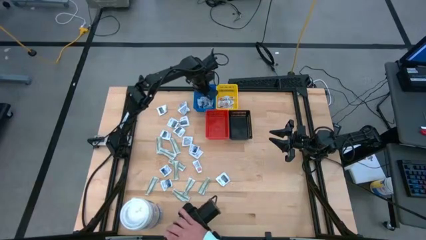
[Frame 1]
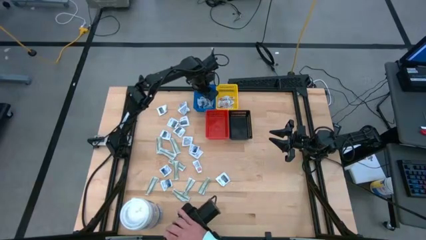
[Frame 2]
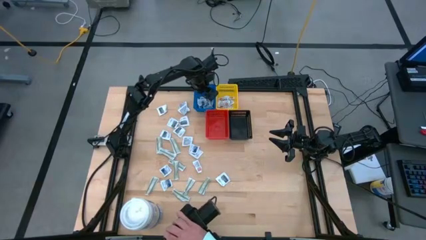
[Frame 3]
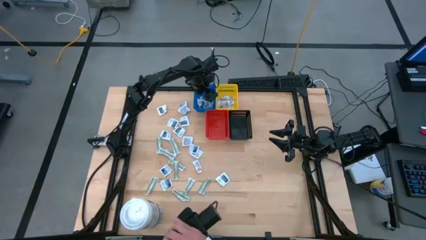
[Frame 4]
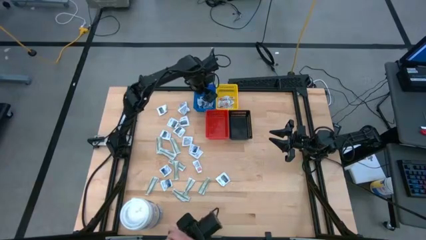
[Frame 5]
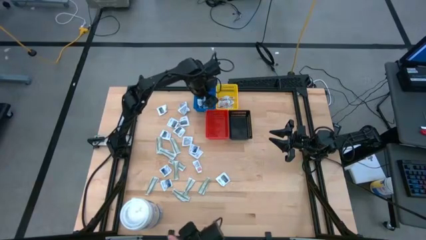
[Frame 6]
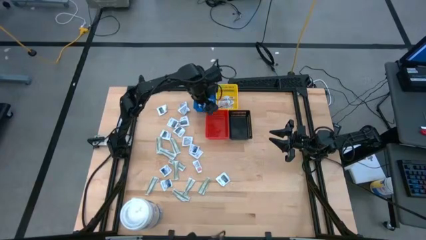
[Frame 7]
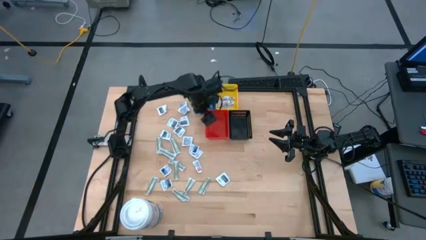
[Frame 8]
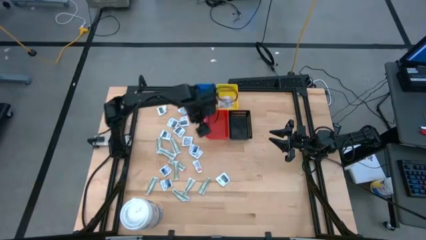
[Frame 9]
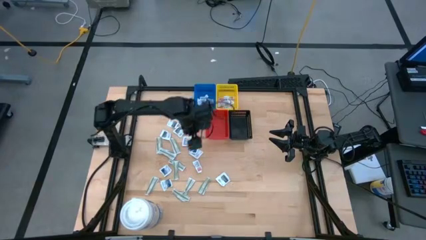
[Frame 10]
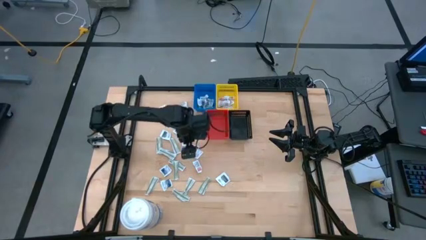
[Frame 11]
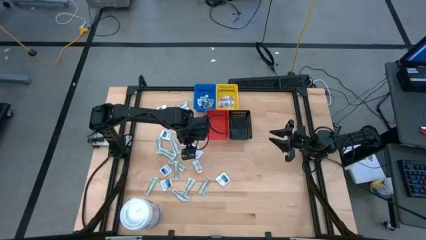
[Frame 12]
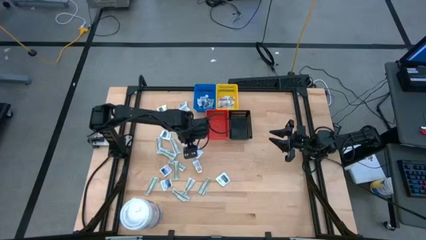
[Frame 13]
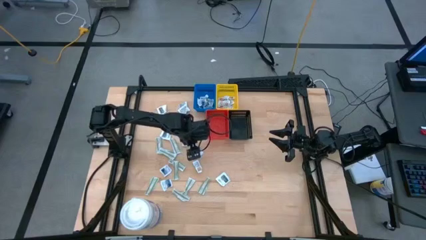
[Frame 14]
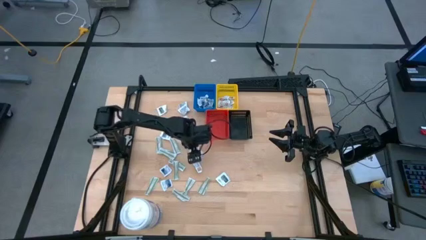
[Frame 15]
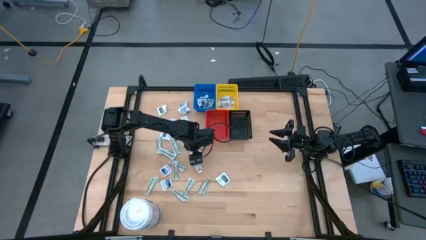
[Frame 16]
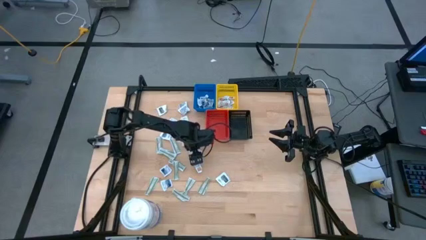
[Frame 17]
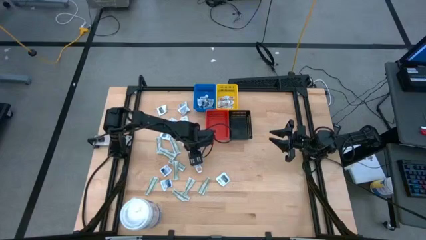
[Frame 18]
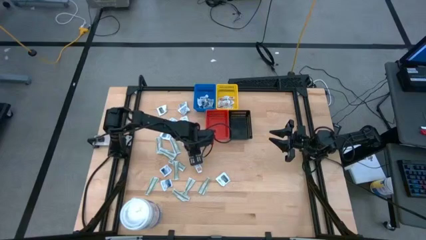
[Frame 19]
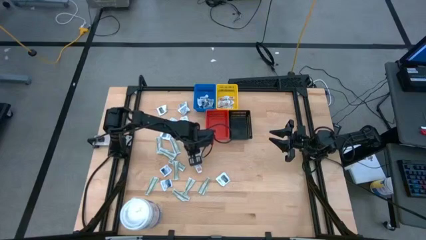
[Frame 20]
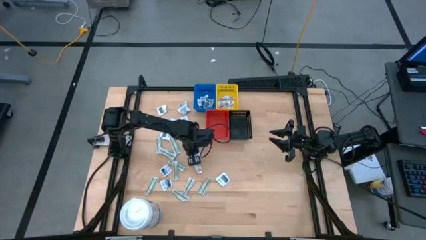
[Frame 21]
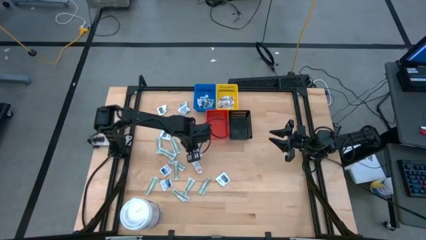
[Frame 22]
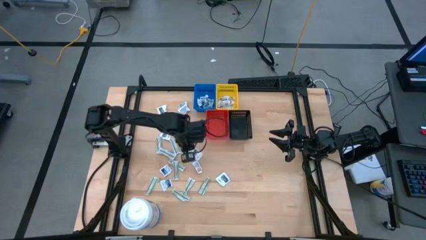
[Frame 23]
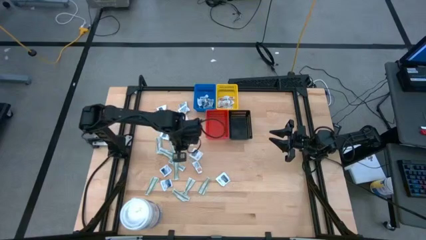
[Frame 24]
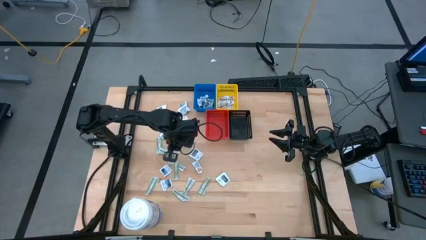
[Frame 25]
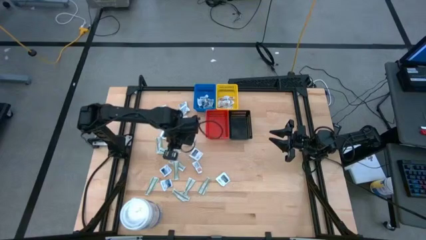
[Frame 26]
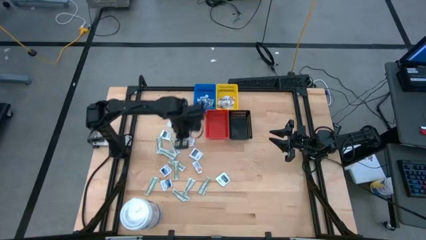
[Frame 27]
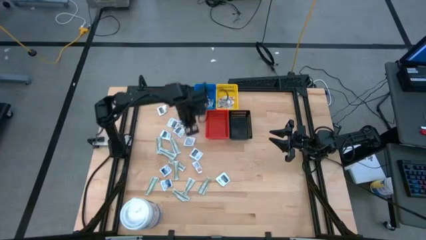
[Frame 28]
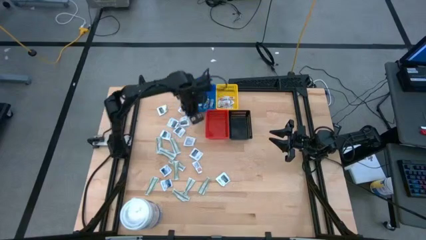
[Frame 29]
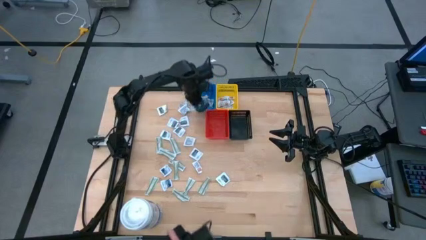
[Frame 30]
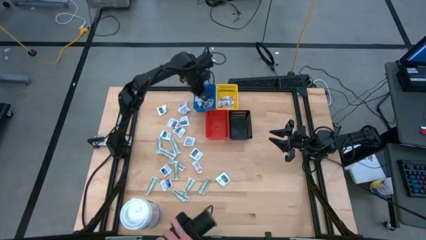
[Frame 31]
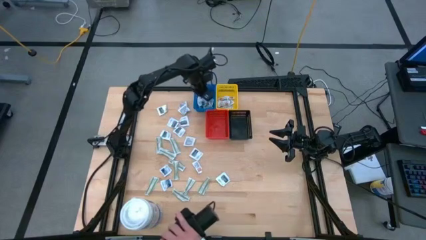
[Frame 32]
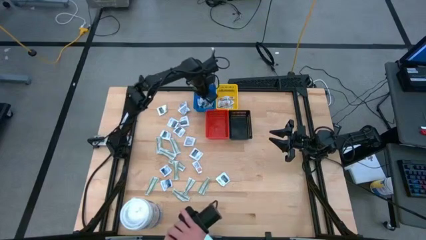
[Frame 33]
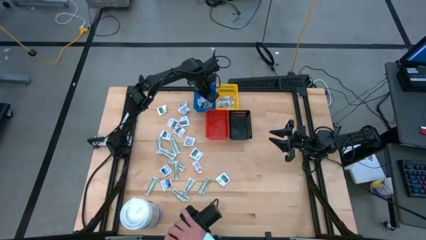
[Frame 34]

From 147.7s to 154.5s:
Task: Pick & Place First Aid Supplies
Put the top alcohol pad into the blue bin

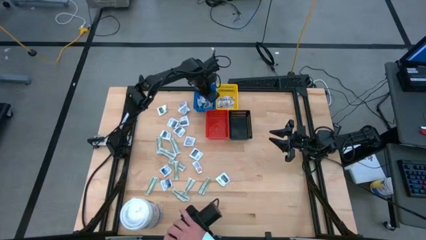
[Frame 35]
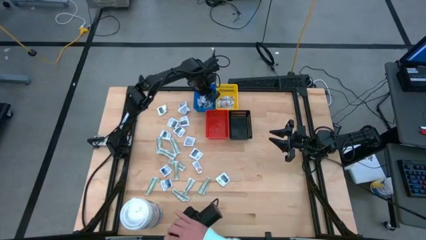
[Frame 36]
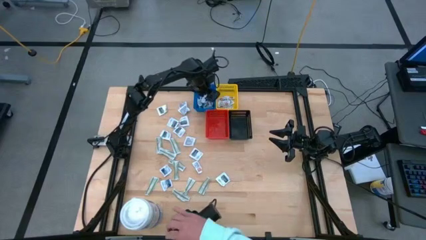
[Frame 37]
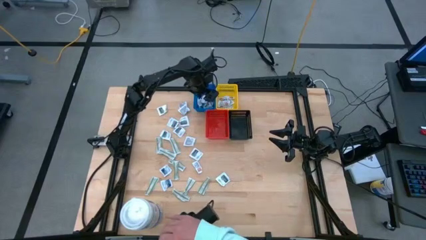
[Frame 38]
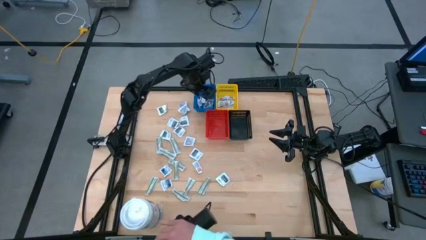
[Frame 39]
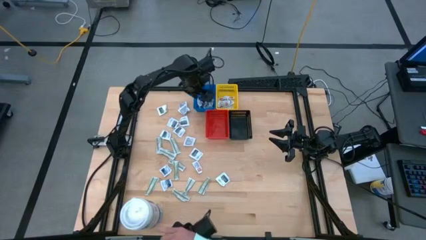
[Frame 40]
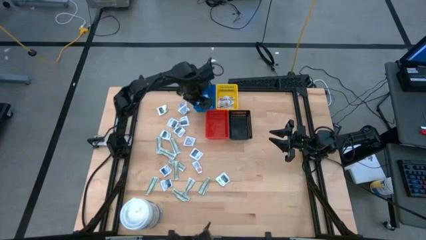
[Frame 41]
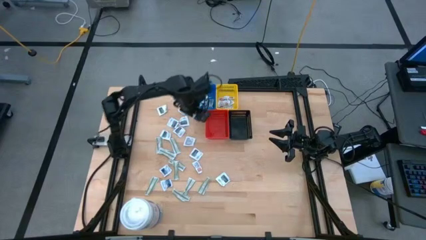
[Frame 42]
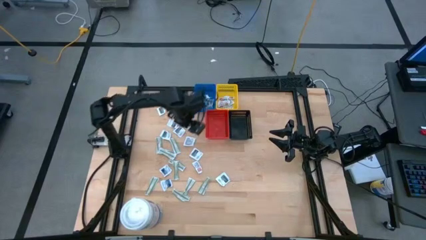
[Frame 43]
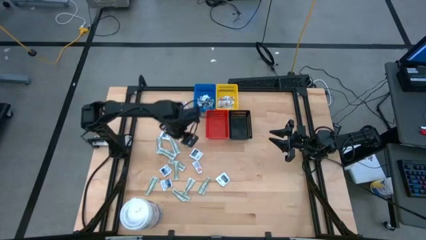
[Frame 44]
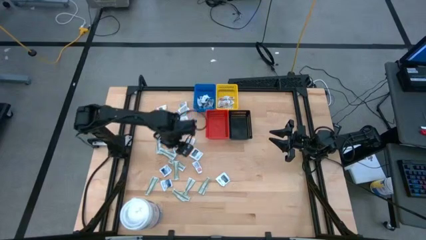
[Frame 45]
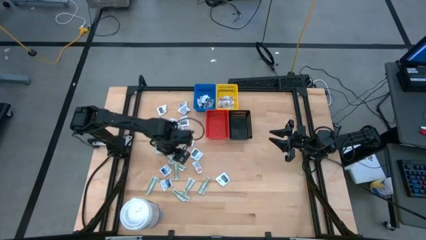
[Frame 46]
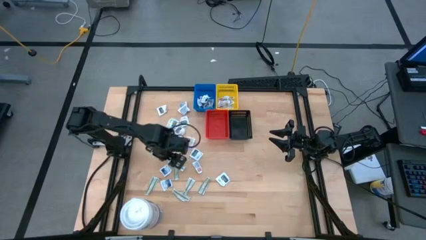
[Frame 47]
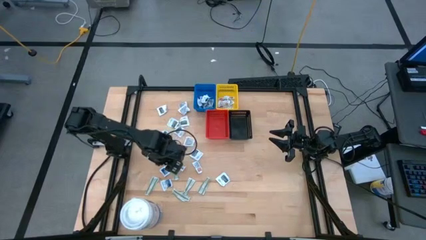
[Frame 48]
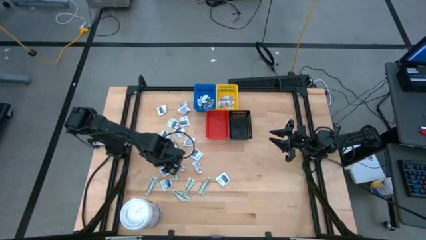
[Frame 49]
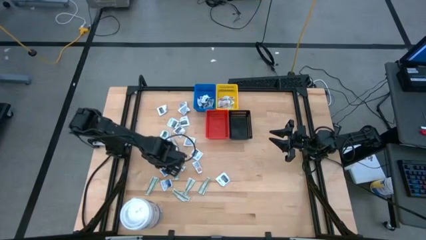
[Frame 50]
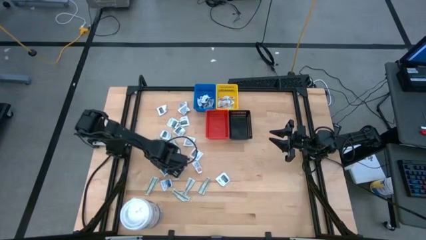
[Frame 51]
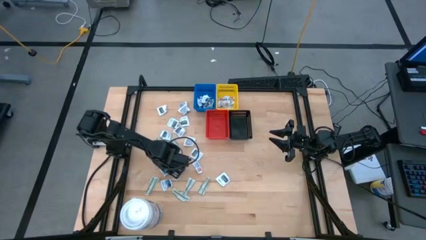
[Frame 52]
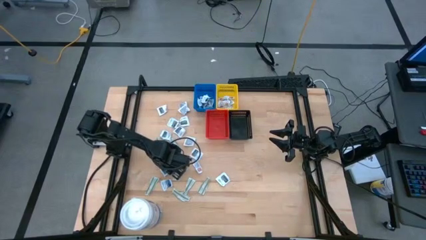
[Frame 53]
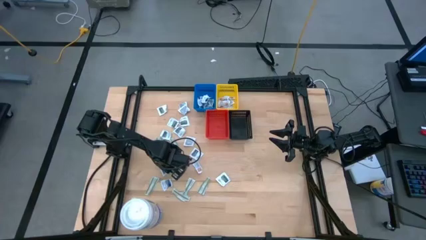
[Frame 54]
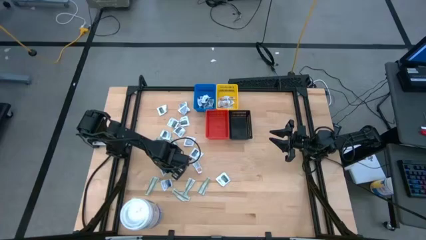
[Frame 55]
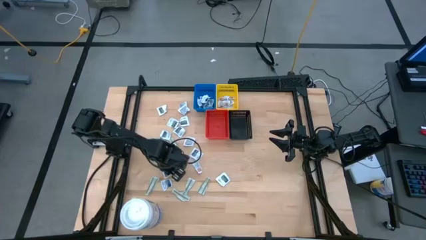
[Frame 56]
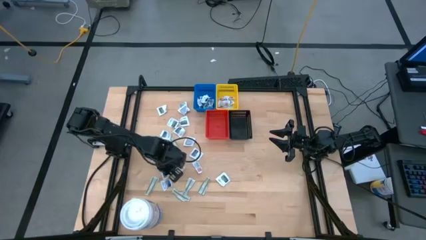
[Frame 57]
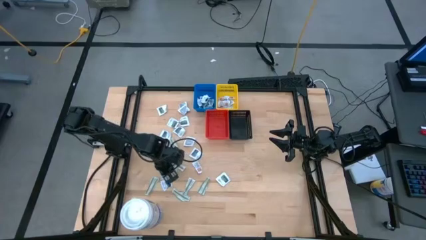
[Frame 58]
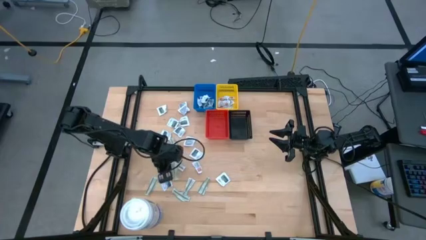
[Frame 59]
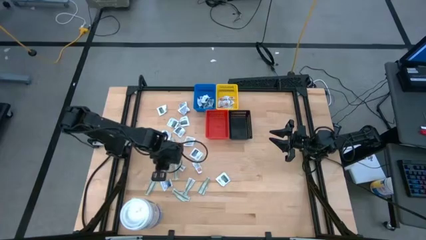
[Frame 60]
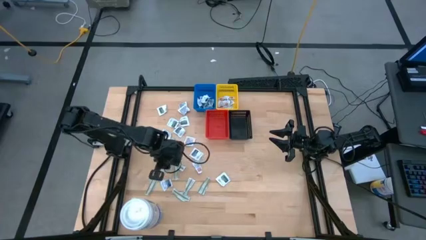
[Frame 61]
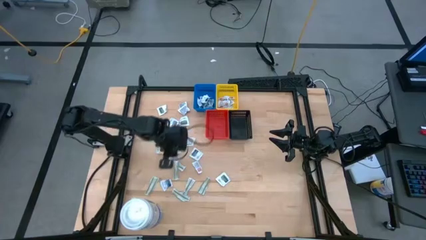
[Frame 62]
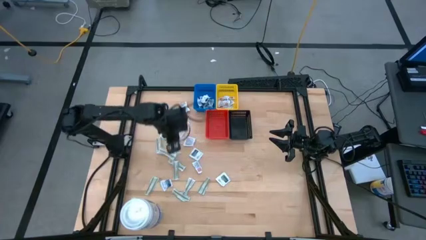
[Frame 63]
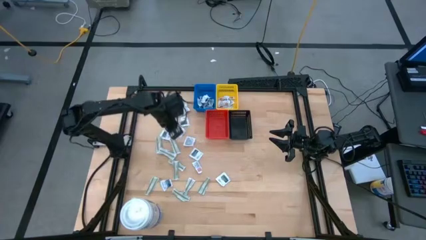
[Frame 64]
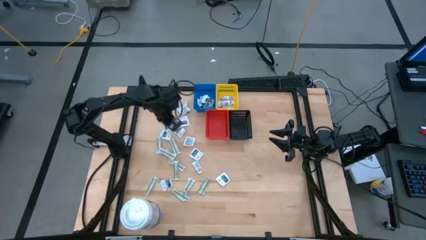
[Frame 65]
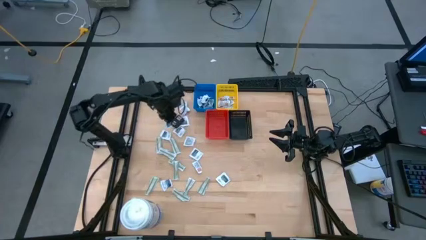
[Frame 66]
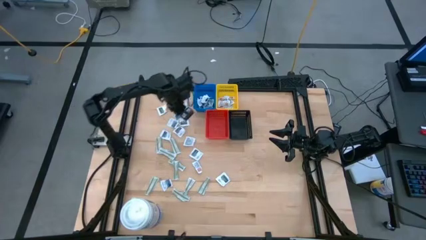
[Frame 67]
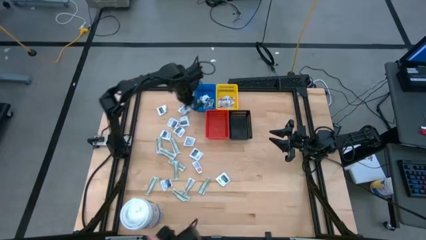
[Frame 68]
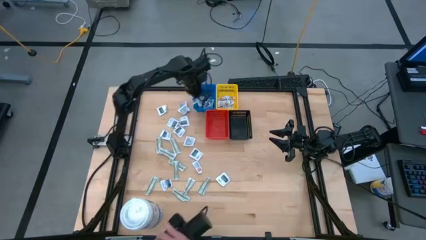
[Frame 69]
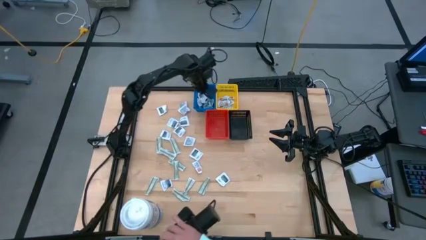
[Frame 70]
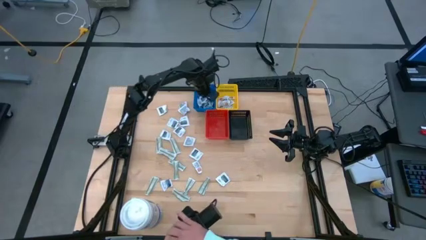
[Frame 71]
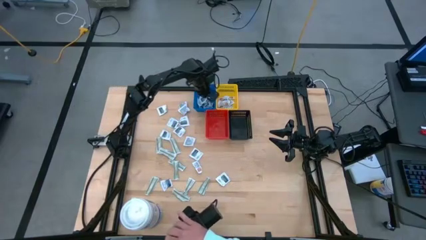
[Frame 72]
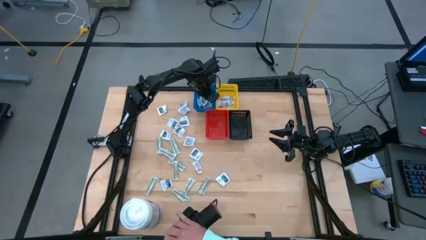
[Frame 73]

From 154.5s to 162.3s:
Put the top alcohol pad into the blue bin
